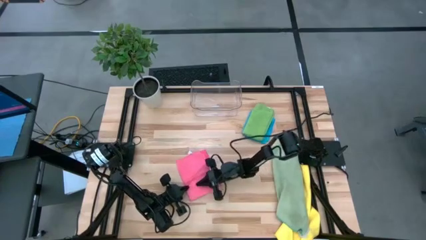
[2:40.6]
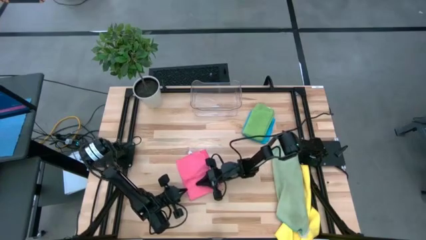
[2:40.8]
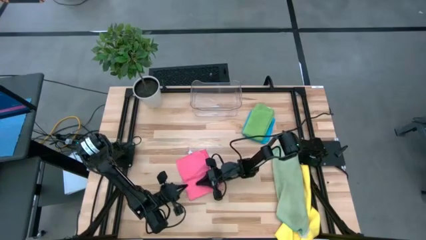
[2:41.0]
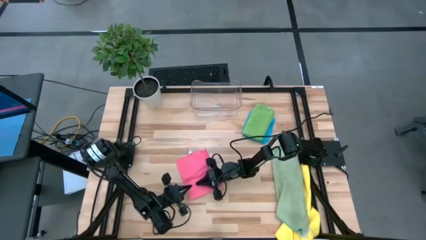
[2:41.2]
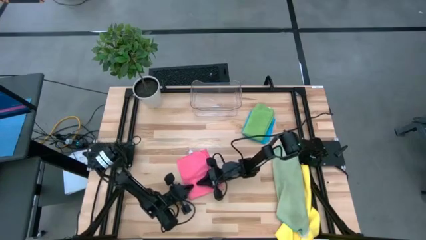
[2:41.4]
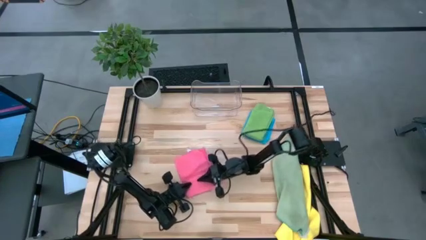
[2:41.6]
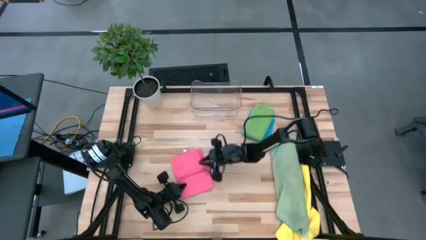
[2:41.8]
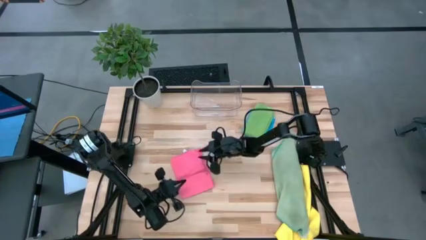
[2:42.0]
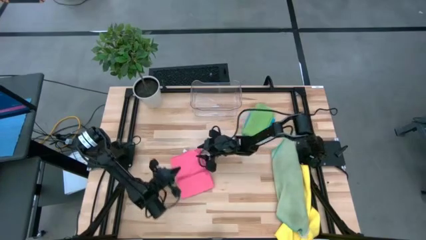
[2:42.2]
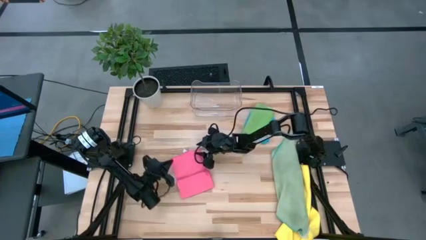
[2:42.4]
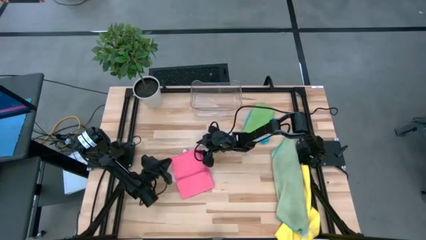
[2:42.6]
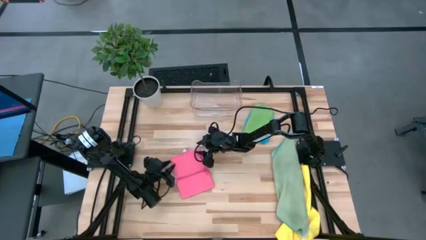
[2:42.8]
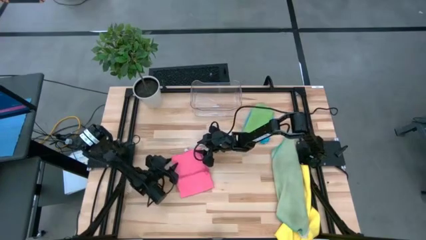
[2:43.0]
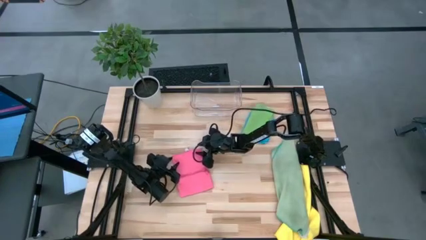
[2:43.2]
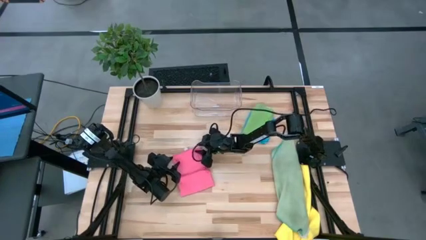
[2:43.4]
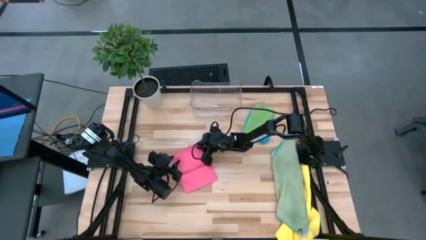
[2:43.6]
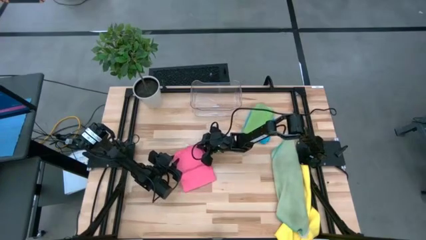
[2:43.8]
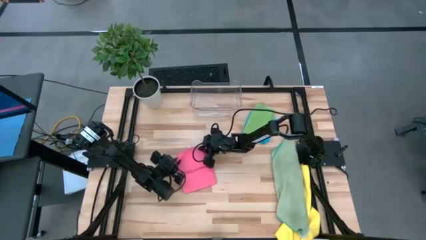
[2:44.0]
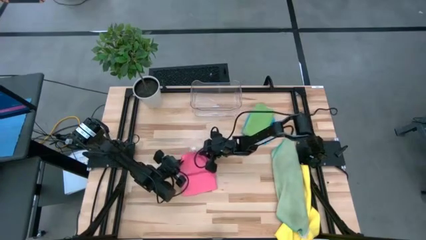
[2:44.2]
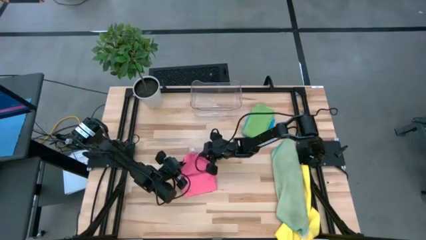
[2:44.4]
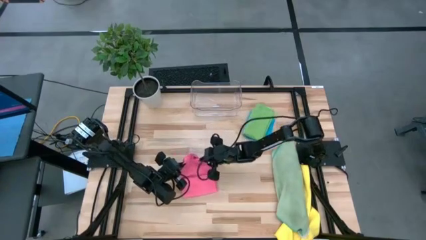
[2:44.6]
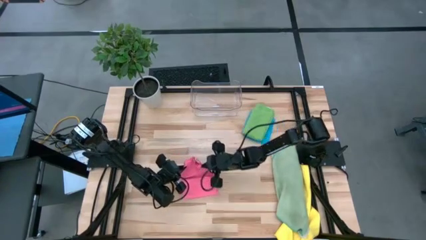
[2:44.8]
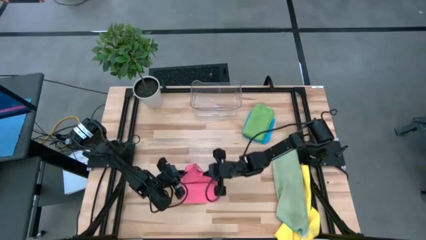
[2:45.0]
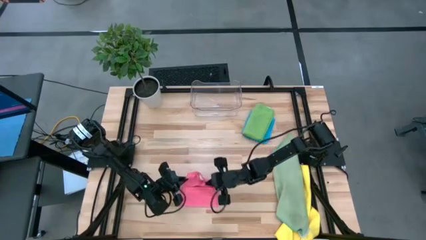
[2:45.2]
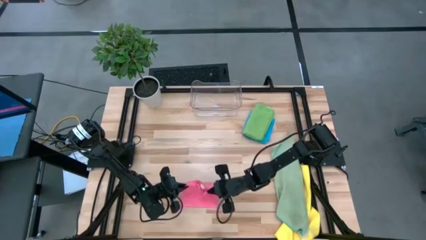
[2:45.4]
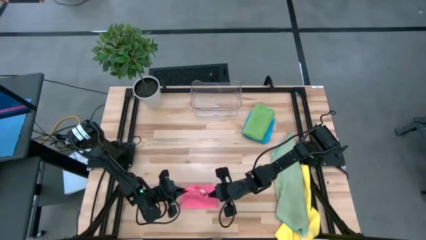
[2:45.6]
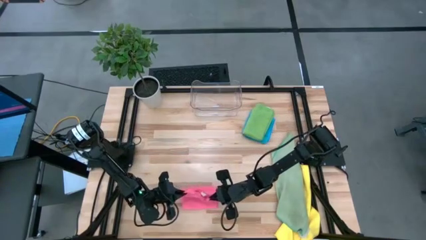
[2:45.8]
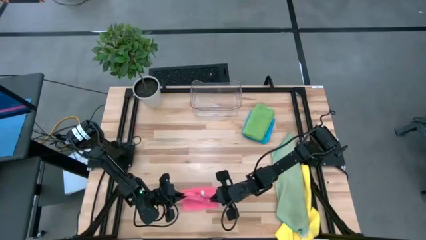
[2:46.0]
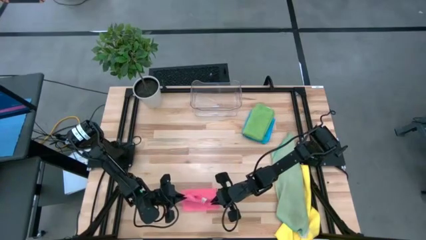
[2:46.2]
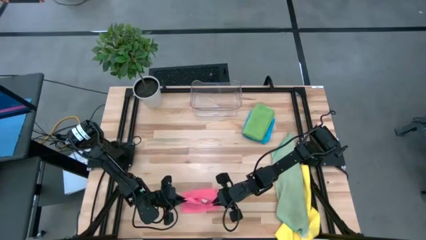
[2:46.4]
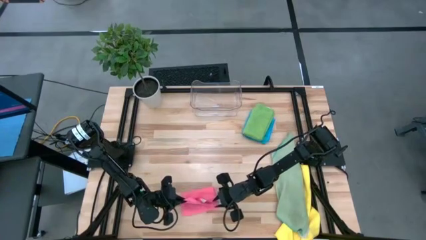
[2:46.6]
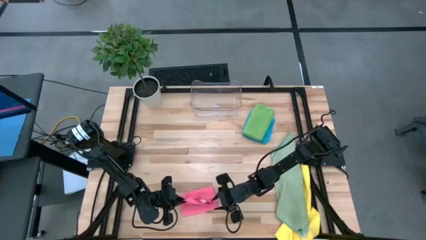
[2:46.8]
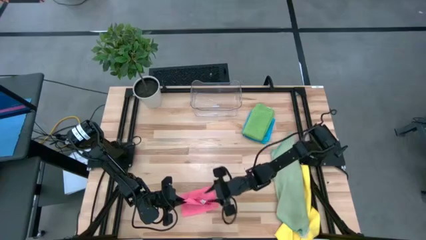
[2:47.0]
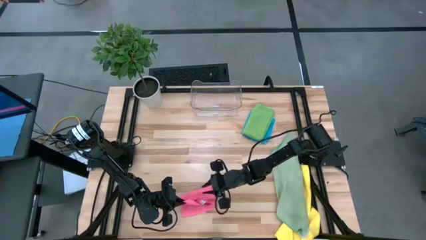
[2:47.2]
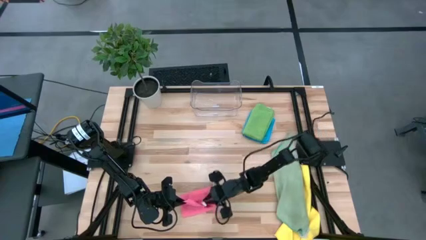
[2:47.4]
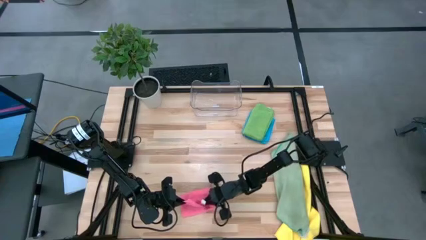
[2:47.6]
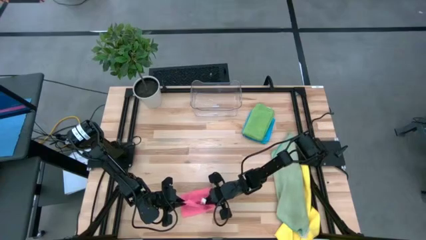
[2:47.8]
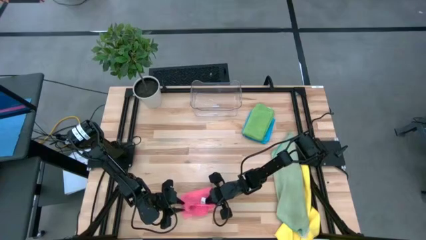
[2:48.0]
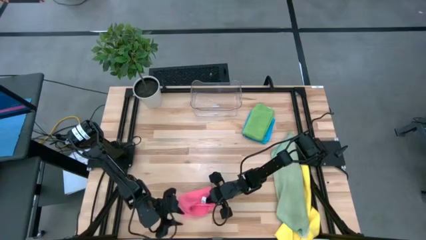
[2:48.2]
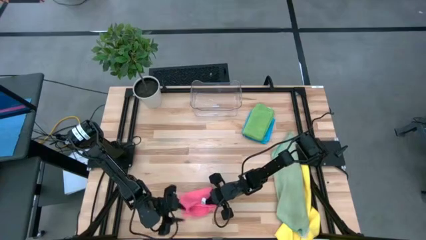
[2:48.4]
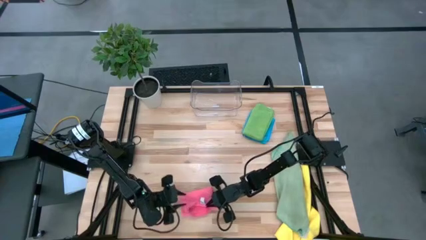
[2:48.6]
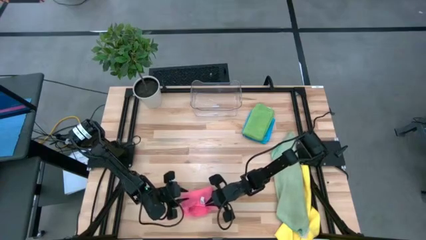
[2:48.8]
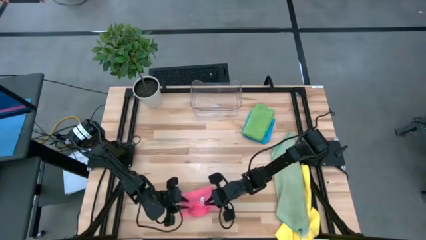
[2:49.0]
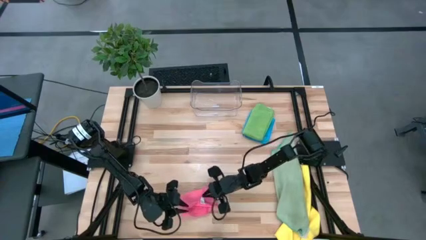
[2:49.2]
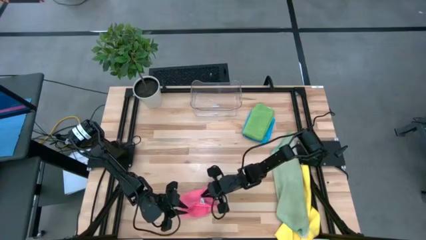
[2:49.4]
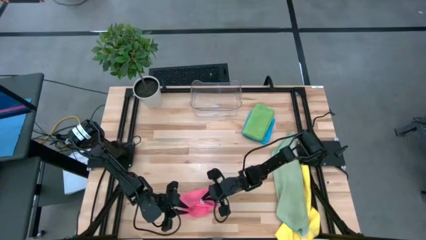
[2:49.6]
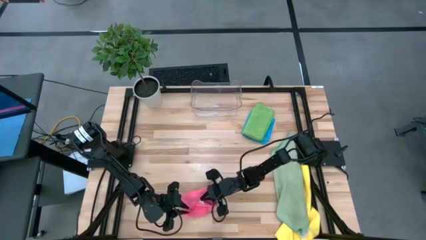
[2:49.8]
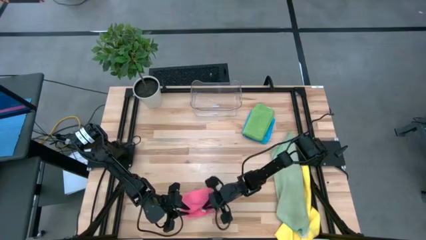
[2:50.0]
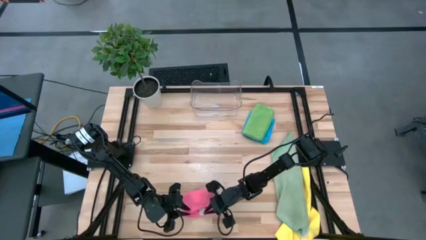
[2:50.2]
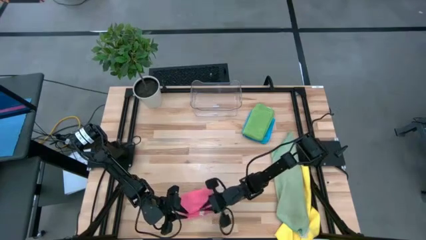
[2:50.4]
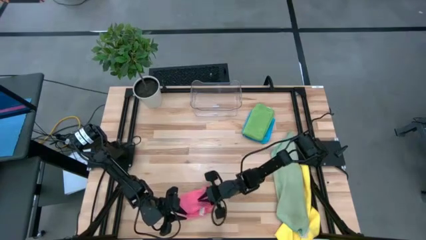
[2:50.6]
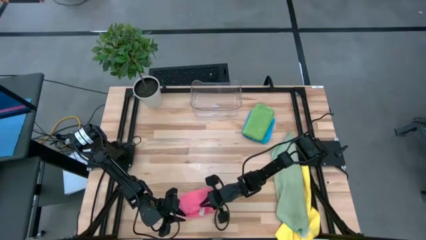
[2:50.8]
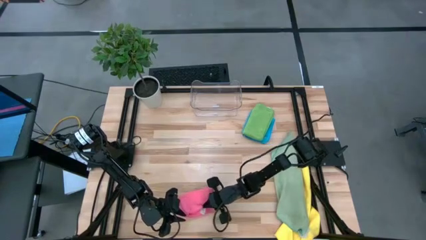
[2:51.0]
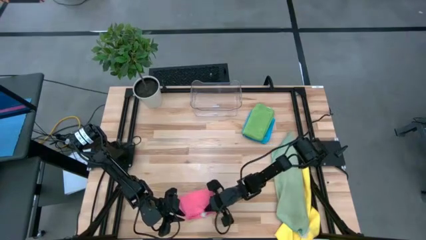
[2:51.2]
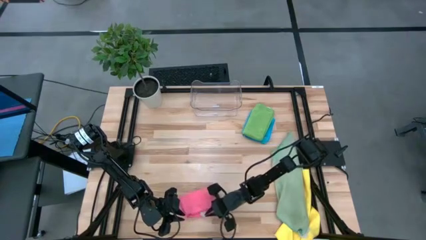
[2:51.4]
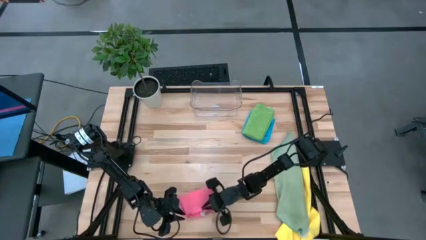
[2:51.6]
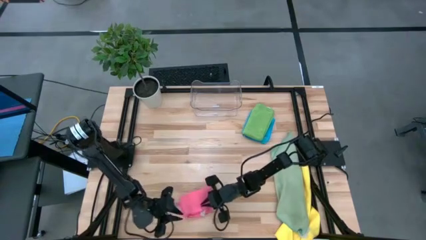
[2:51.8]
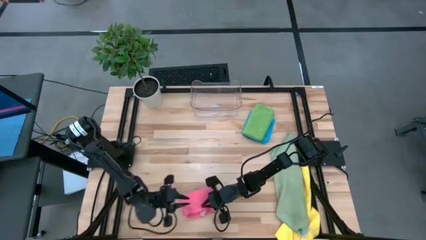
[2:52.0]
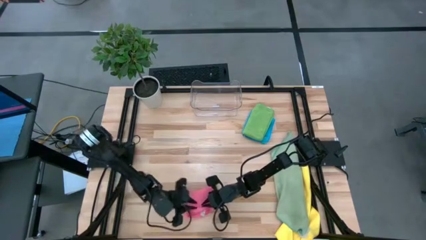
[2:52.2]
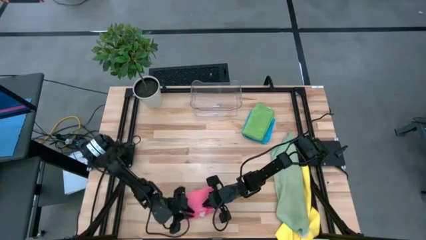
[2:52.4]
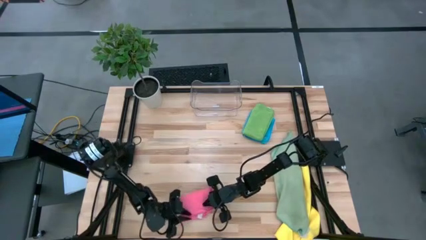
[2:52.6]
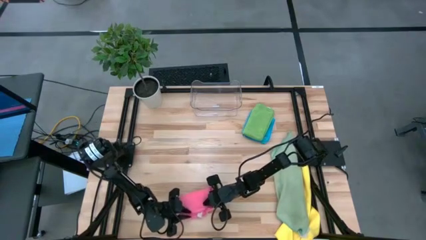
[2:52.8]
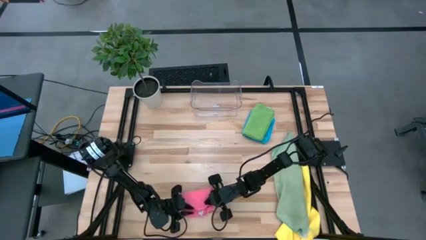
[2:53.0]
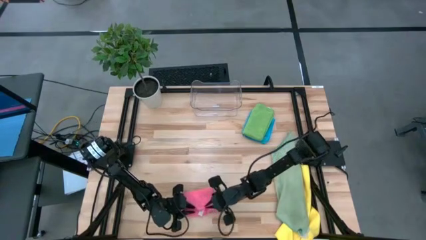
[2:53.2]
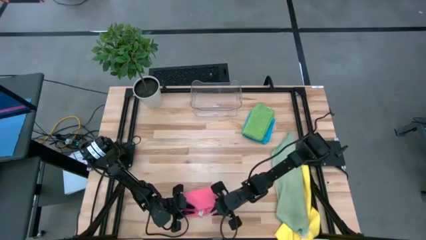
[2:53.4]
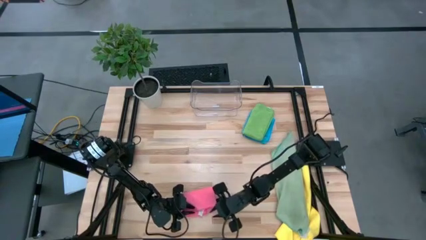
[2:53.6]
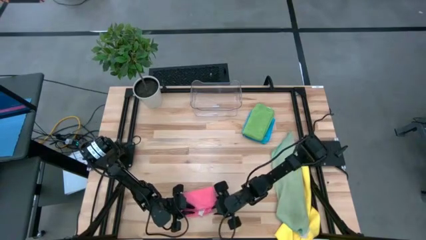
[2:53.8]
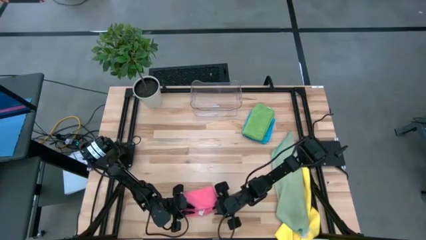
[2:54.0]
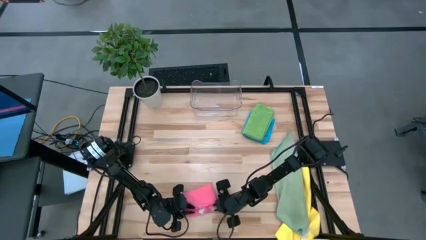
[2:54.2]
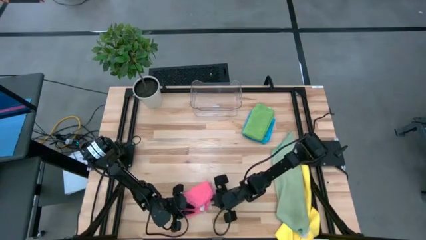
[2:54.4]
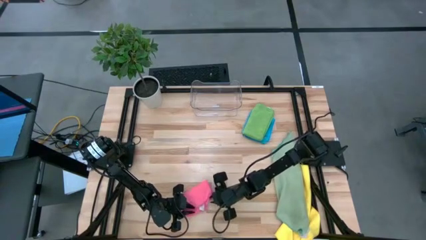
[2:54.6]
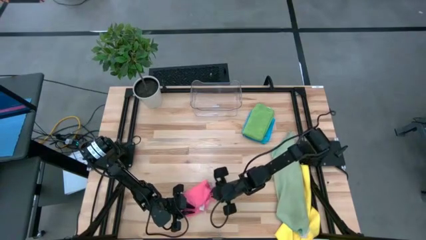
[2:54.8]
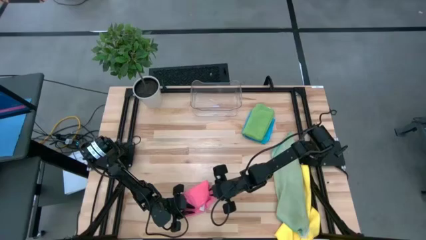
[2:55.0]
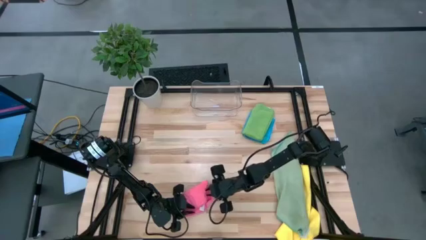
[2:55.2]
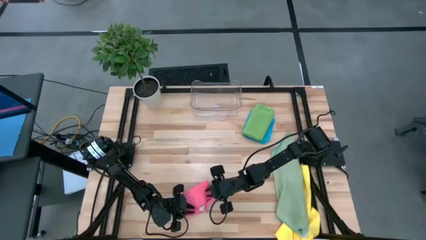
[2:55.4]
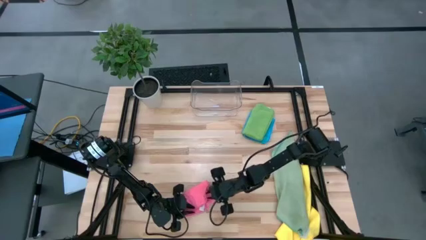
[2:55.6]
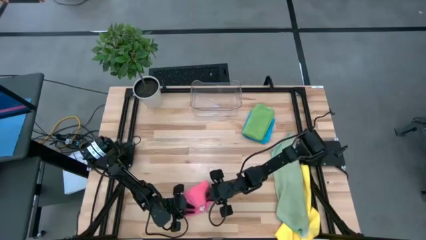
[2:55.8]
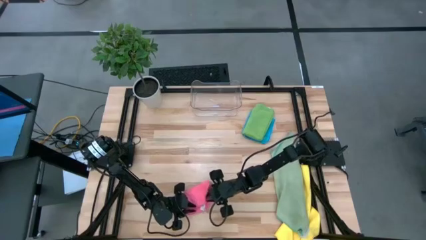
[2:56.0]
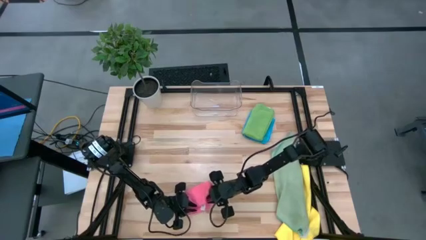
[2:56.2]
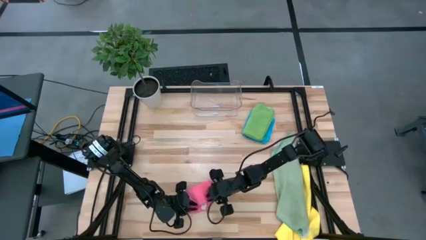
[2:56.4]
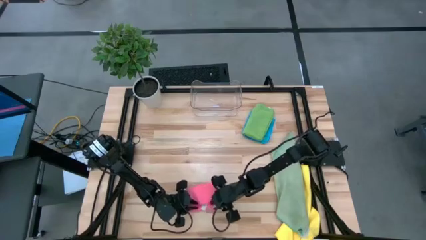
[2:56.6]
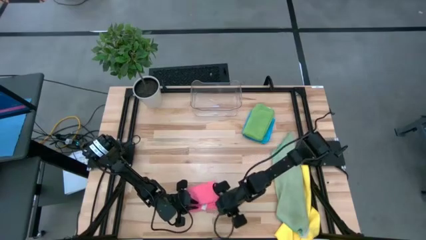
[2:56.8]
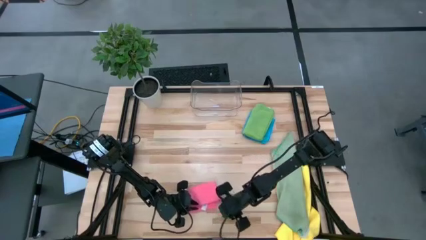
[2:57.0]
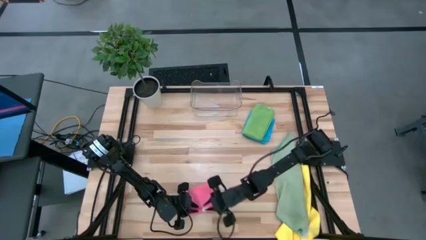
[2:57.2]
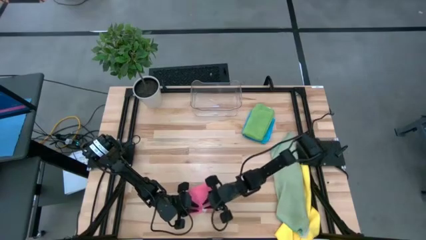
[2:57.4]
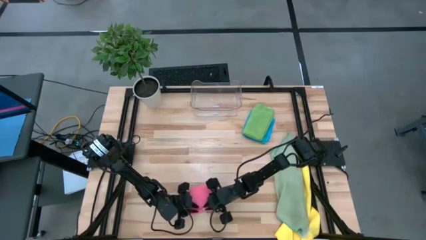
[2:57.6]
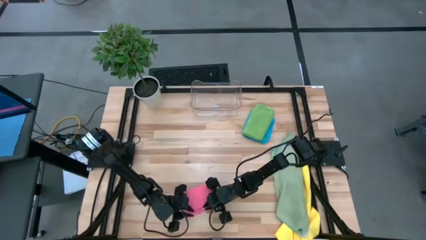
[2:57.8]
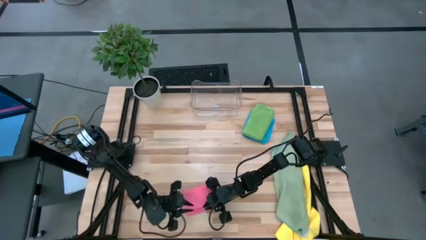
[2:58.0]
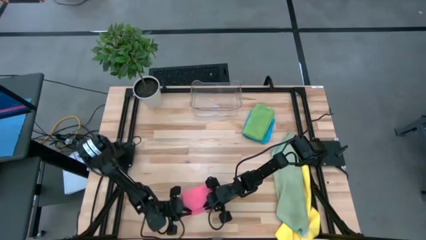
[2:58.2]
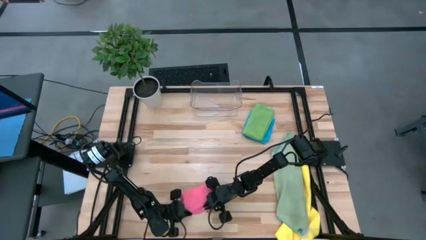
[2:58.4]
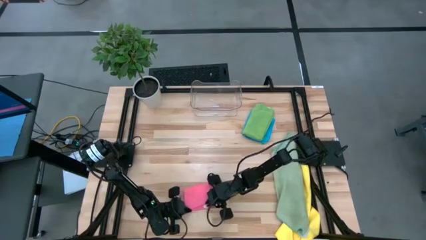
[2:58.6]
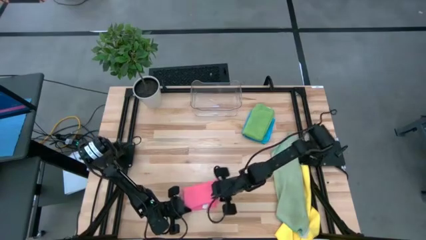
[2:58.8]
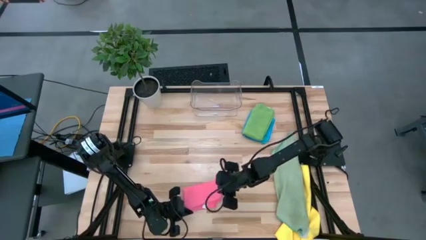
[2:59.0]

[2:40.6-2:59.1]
Task: Fold microfiber towels
Fold pink microfiber towel
